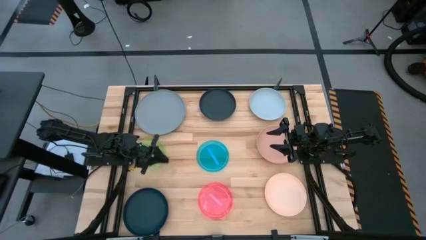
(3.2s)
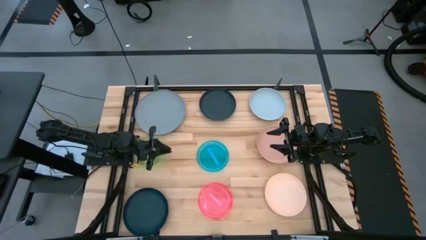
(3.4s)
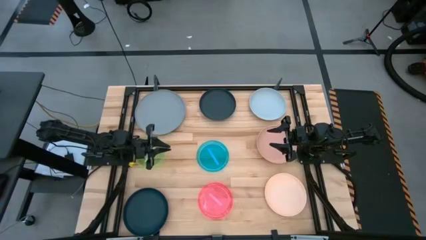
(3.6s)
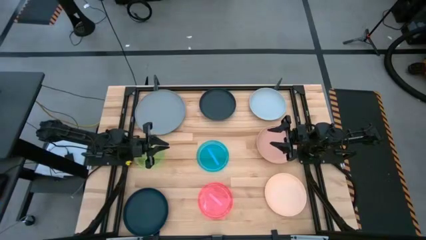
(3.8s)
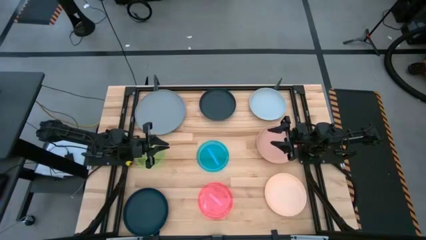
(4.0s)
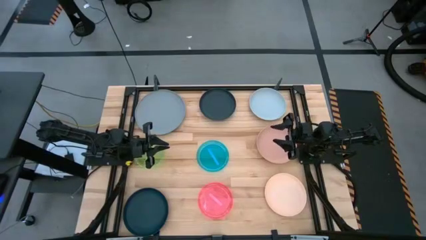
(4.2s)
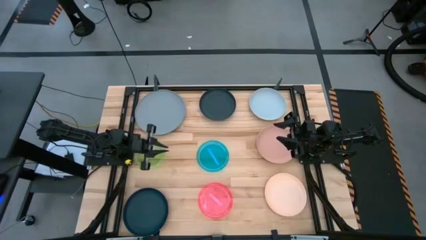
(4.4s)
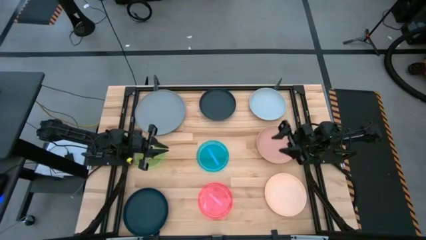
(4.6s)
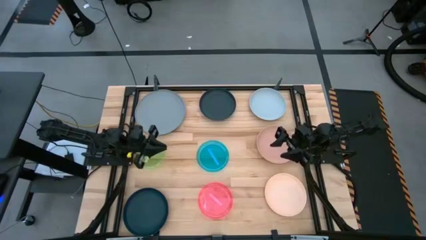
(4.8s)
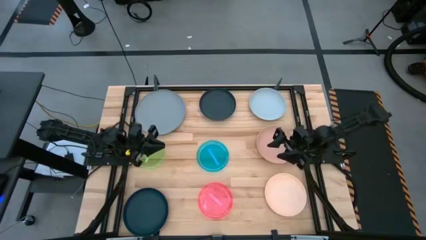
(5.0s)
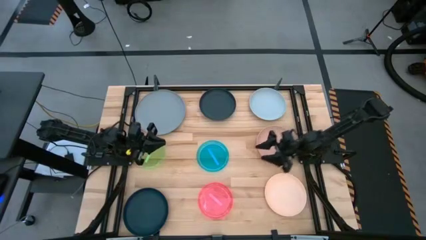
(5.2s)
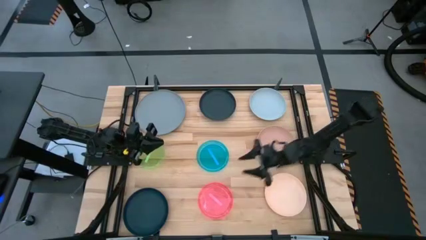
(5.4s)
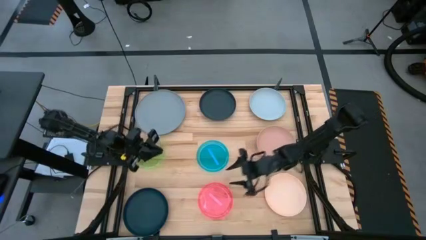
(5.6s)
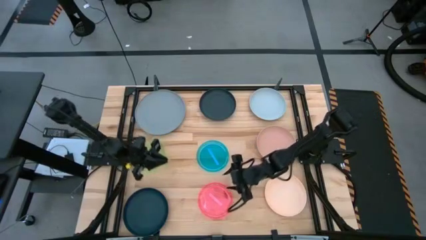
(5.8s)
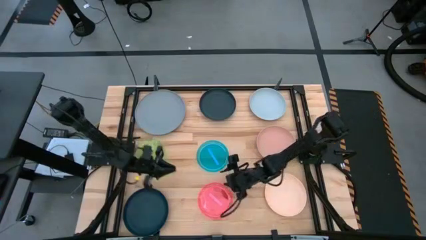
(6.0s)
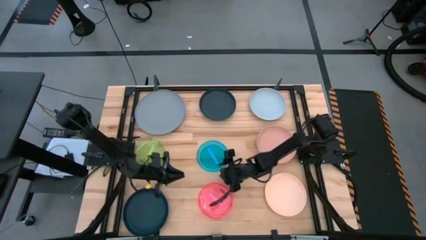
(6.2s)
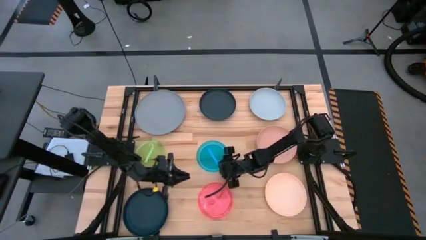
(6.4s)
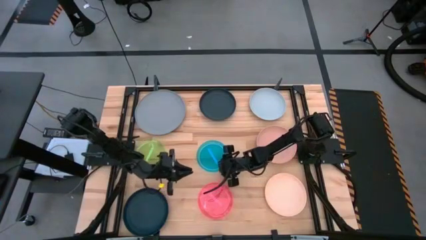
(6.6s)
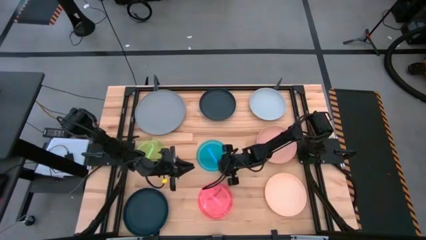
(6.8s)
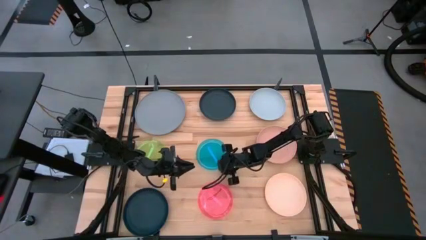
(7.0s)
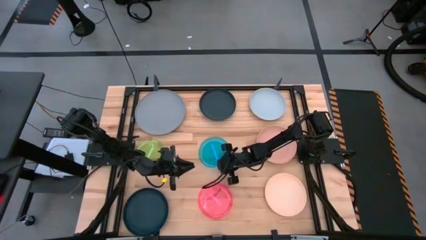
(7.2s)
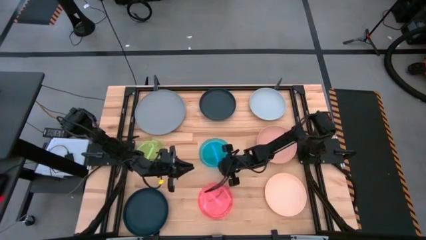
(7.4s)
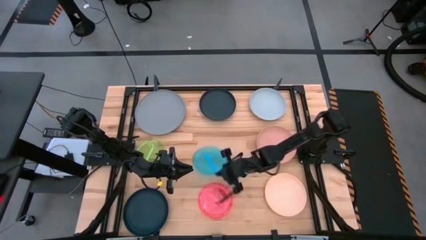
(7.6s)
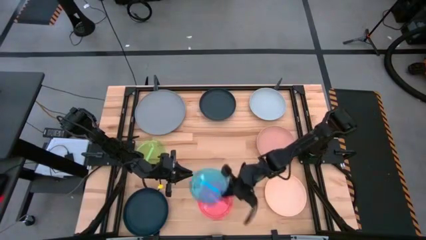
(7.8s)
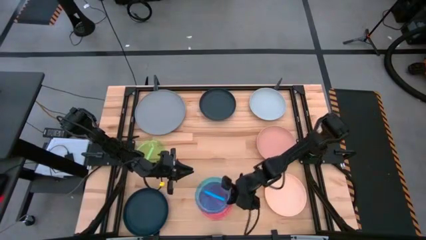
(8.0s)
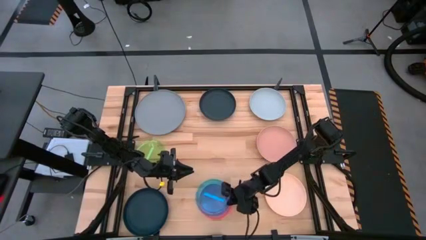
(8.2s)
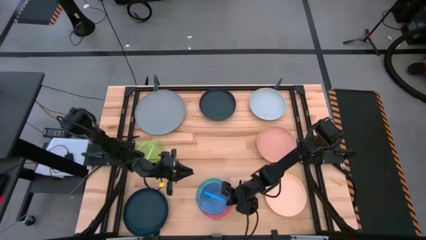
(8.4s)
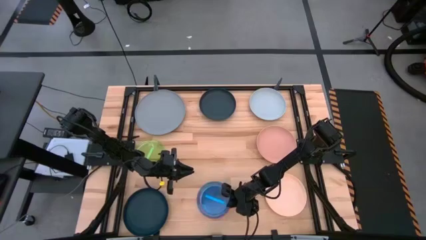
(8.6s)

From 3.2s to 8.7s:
Task: Stack plastic plates
Stack the blue plate on the pink plate

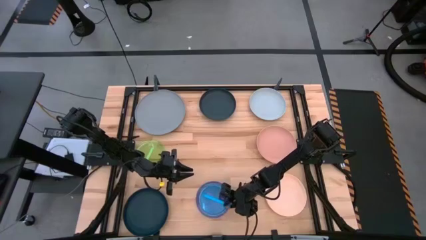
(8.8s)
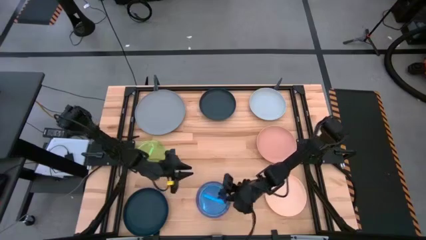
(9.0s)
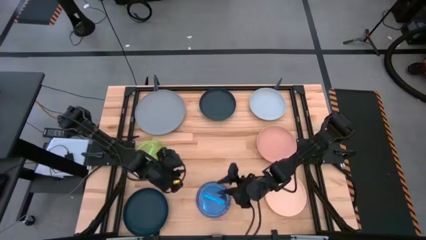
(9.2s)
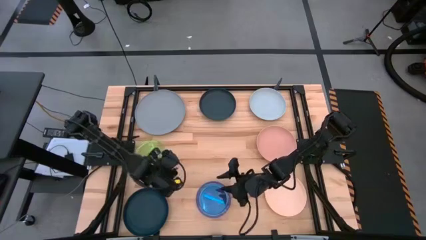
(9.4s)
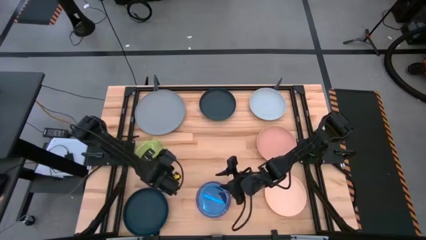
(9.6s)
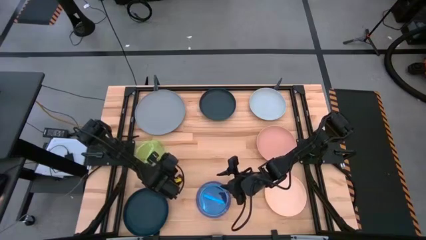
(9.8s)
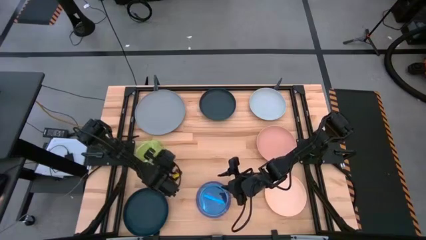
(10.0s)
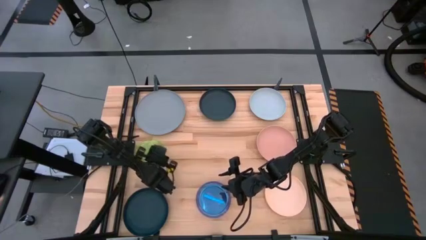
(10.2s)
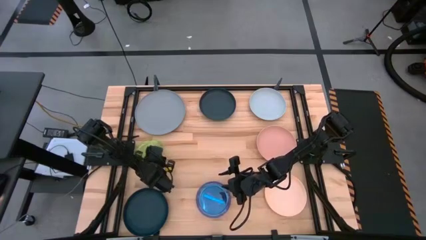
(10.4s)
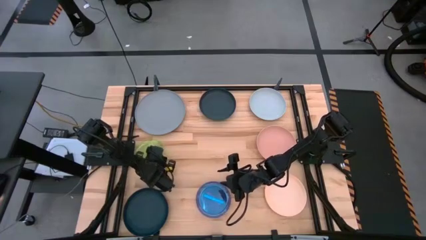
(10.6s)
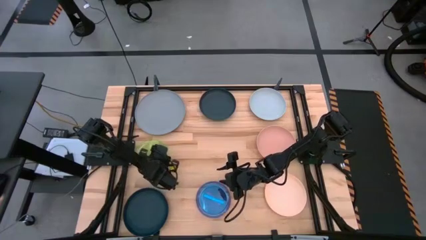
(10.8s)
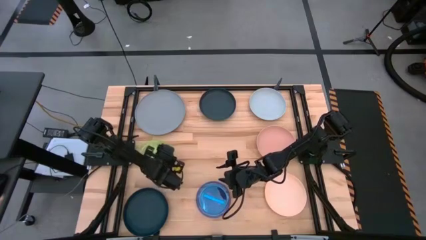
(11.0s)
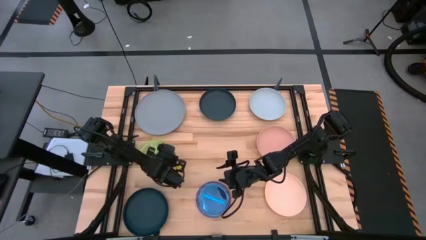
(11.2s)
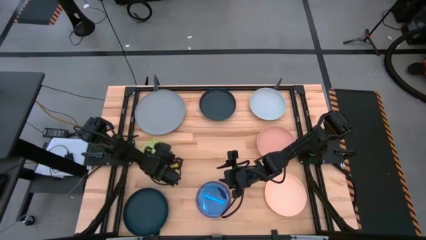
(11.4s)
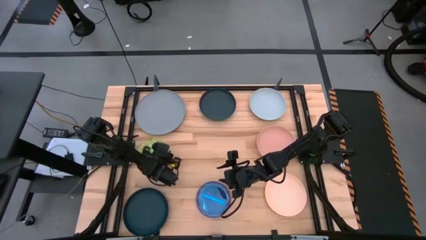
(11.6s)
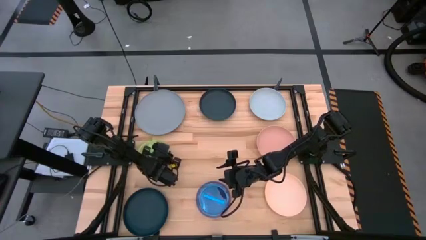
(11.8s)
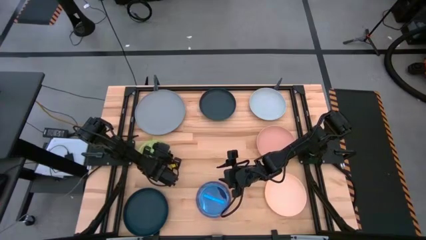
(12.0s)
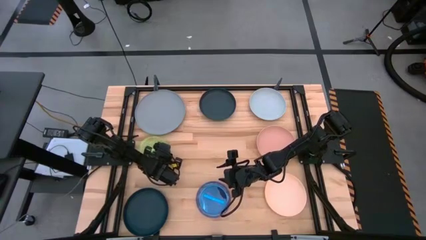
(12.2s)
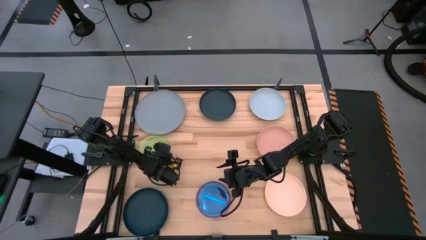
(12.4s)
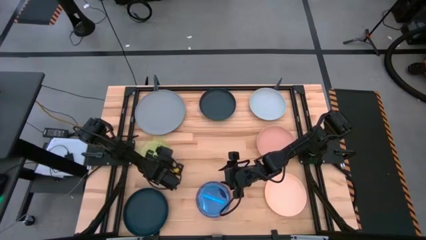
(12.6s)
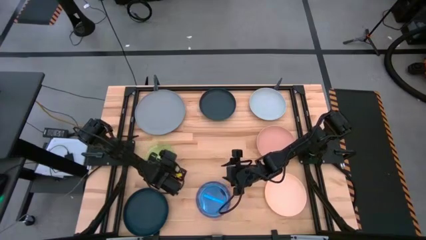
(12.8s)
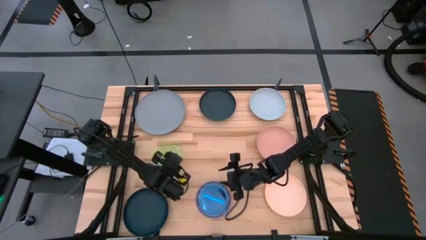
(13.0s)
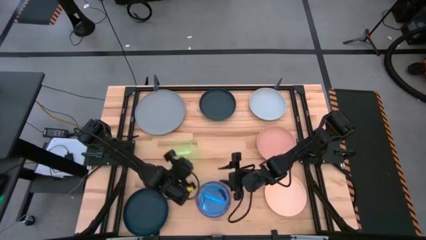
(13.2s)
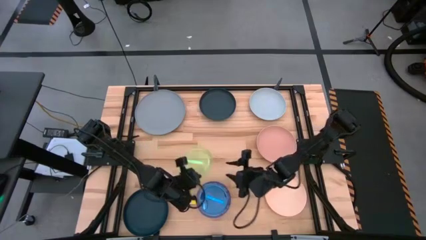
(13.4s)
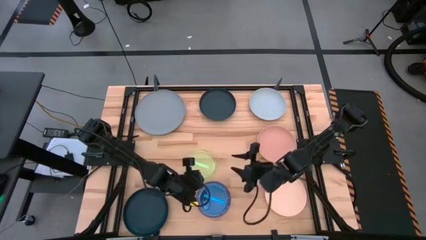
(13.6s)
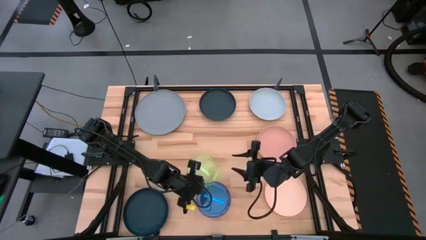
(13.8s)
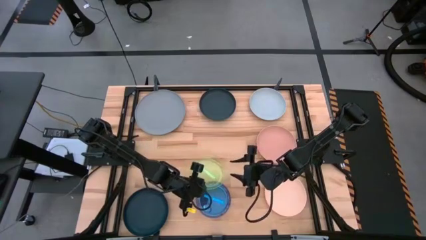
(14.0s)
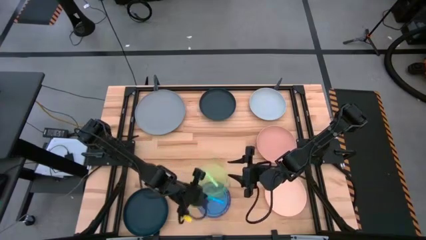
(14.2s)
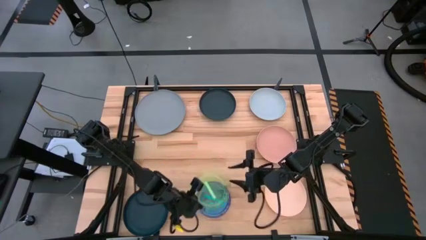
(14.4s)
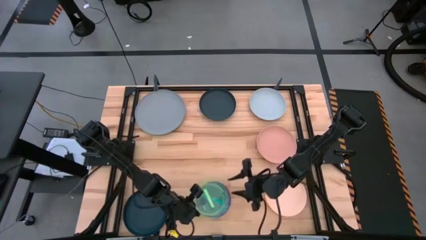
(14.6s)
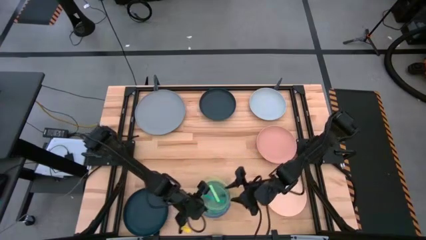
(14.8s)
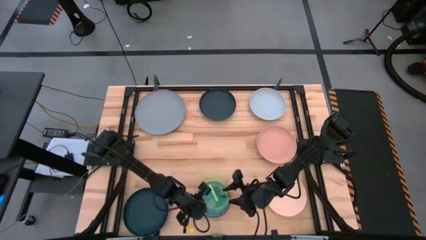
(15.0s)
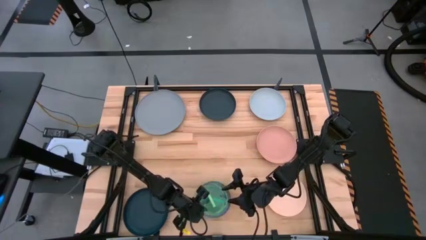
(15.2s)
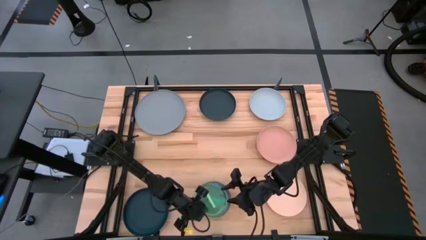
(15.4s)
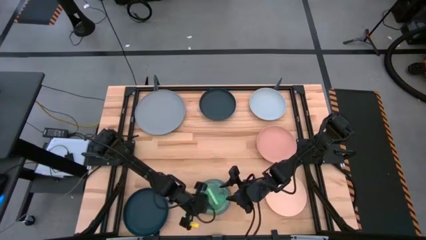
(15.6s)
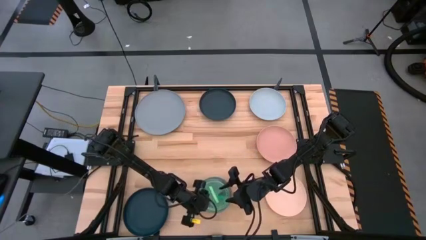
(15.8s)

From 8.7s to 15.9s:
Stack the green plate on the blue plate

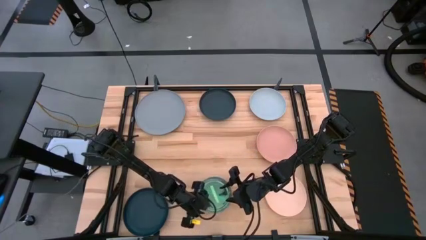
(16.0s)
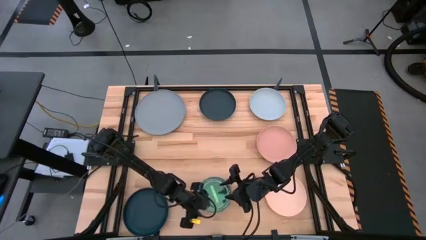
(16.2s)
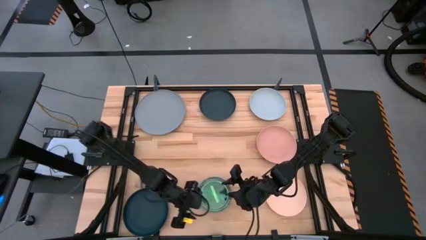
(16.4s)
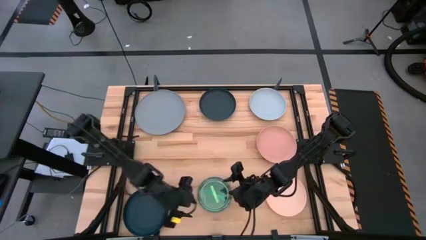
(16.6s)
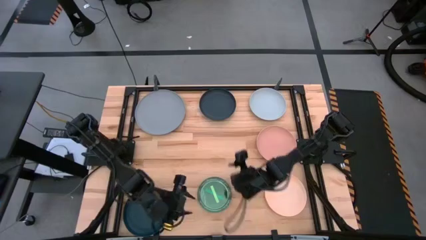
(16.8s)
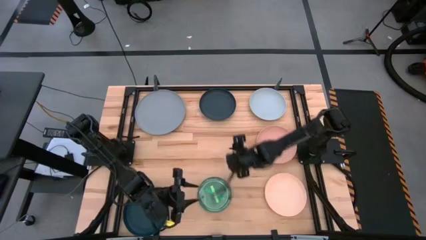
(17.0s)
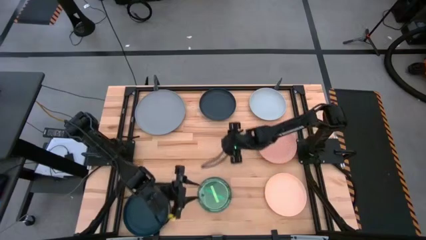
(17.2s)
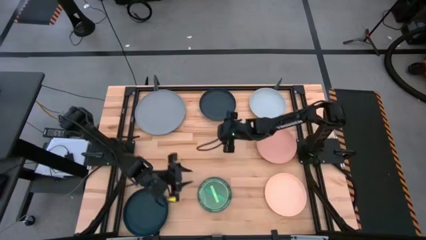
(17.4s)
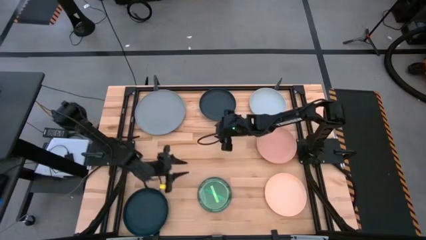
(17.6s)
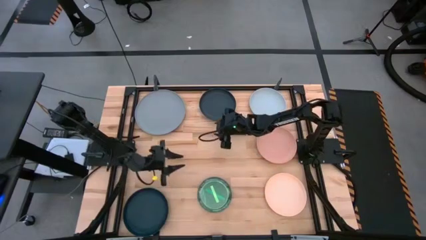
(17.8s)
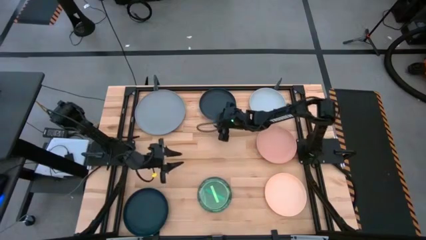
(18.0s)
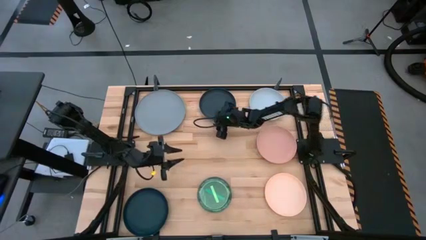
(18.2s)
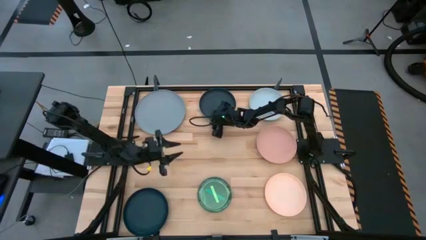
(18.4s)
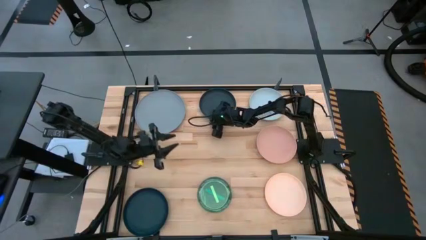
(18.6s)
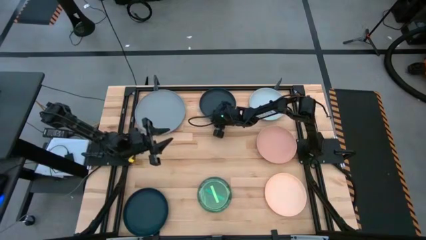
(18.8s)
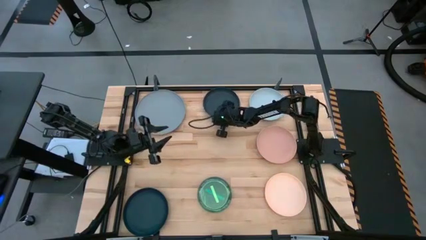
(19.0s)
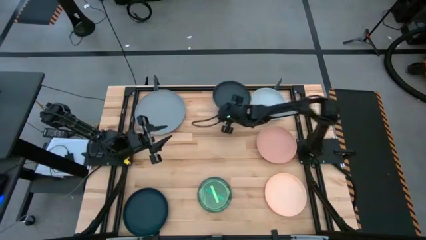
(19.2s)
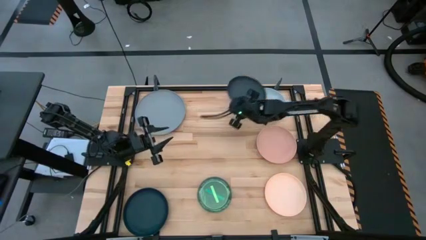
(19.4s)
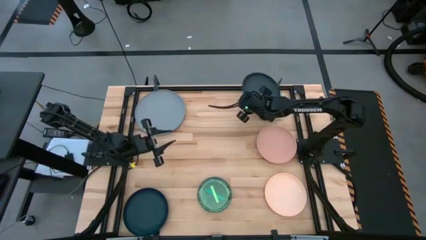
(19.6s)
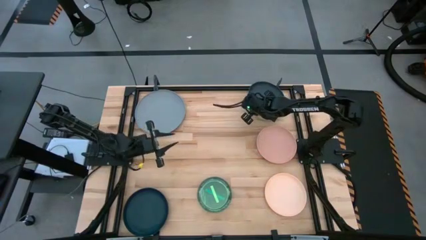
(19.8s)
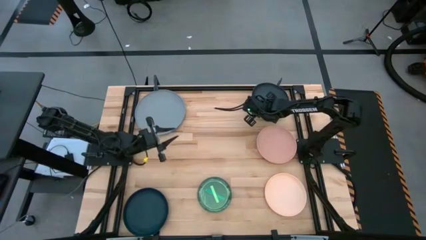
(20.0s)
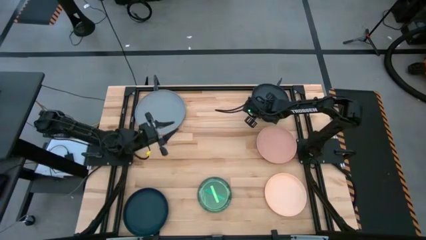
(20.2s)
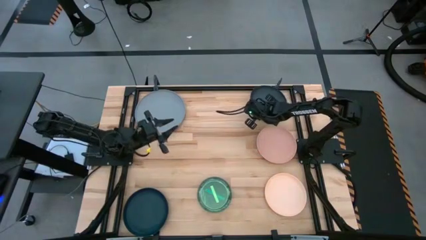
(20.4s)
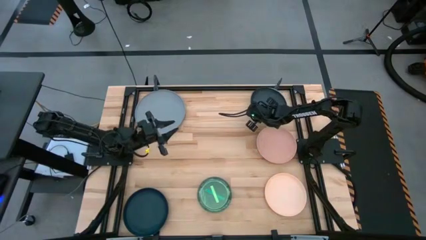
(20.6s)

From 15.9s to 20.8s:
Stack the black plate on the light blue plate
